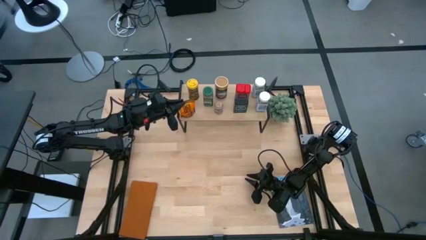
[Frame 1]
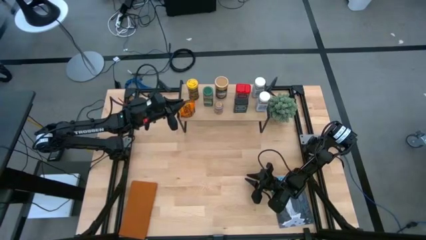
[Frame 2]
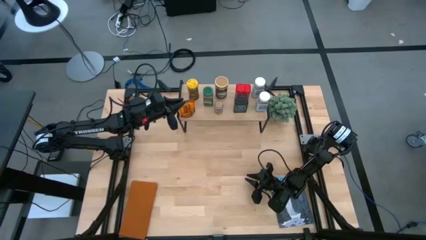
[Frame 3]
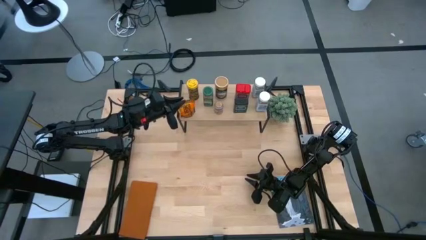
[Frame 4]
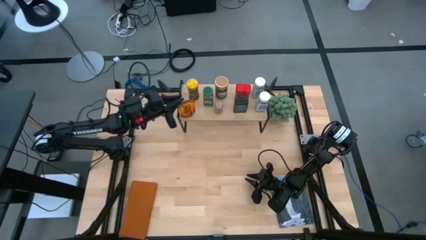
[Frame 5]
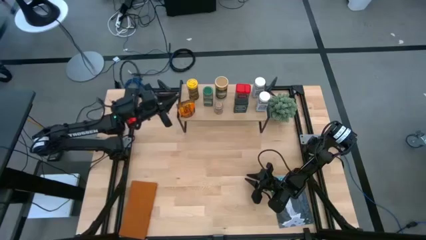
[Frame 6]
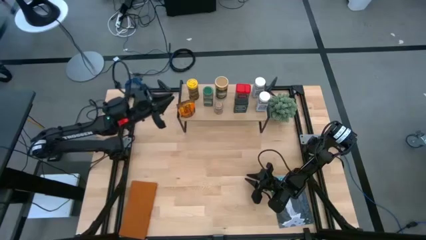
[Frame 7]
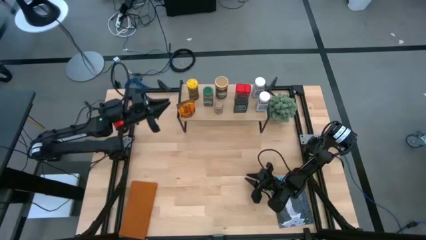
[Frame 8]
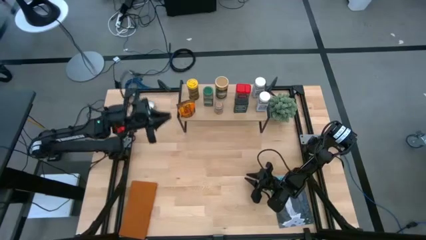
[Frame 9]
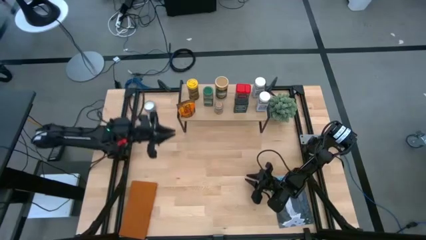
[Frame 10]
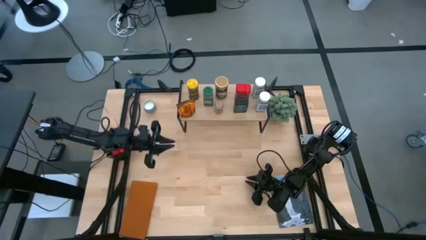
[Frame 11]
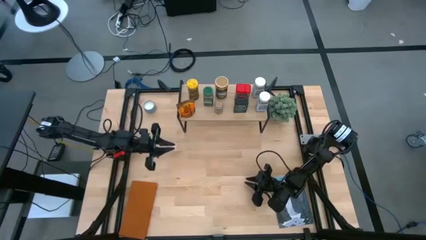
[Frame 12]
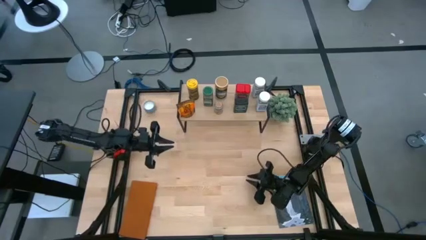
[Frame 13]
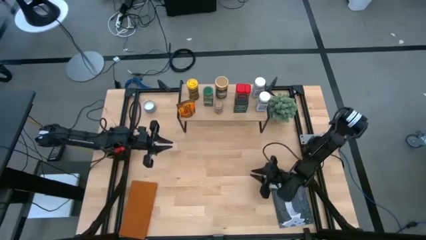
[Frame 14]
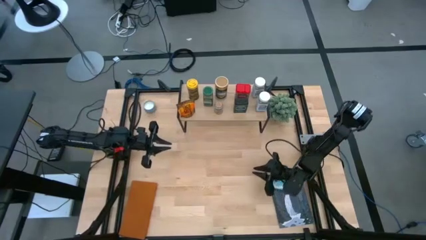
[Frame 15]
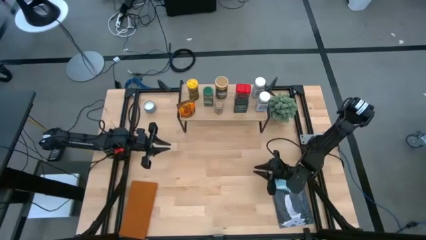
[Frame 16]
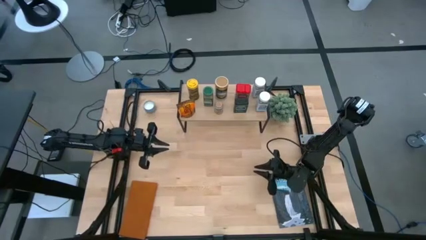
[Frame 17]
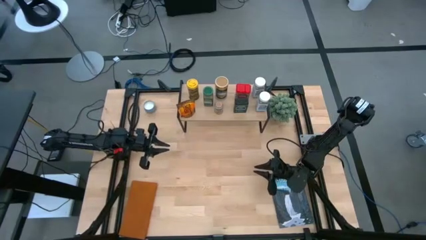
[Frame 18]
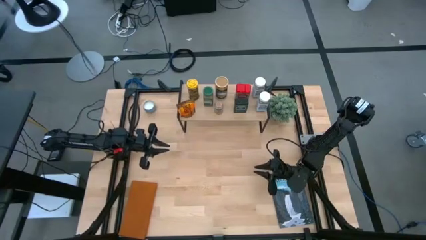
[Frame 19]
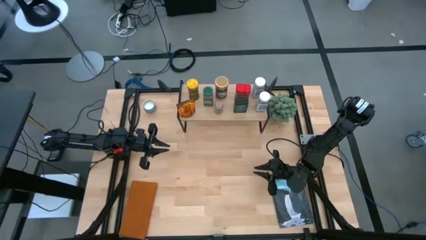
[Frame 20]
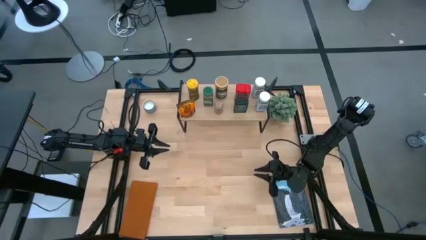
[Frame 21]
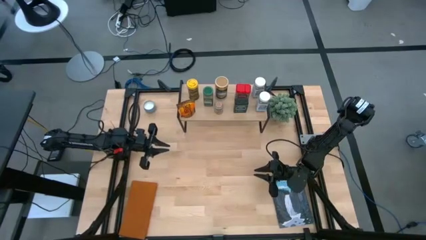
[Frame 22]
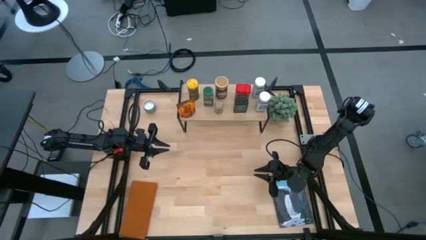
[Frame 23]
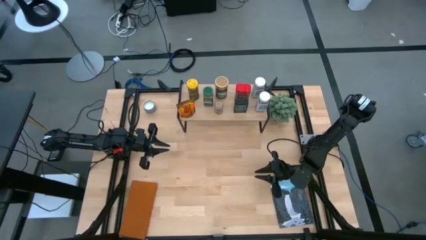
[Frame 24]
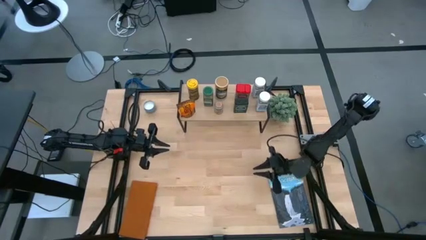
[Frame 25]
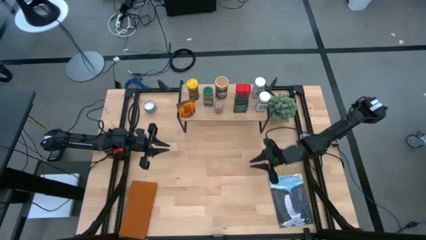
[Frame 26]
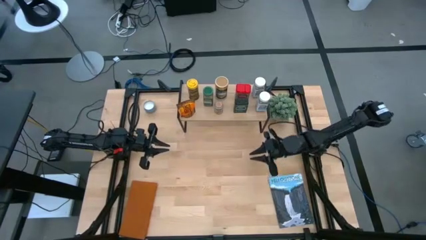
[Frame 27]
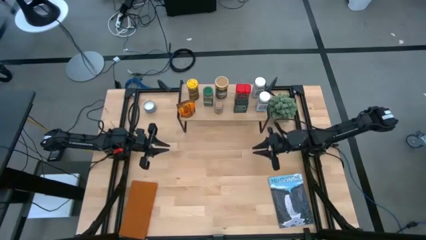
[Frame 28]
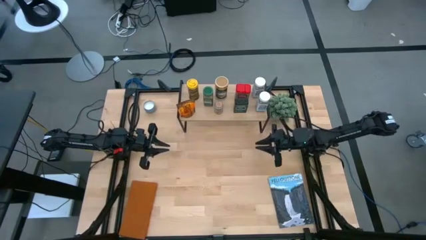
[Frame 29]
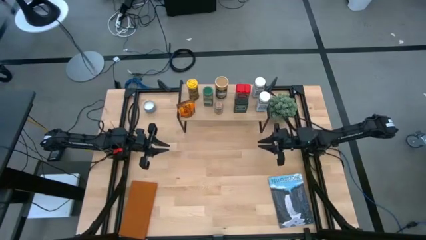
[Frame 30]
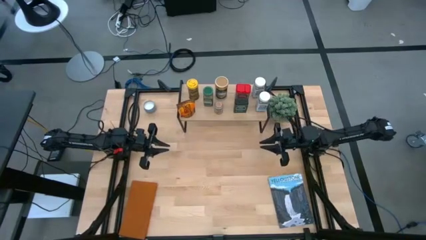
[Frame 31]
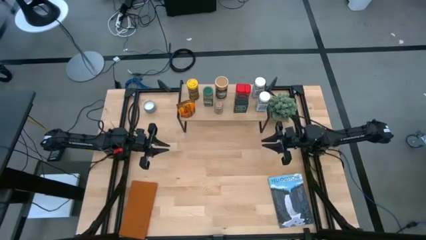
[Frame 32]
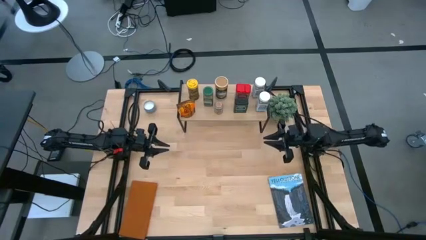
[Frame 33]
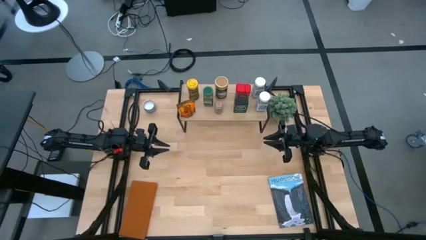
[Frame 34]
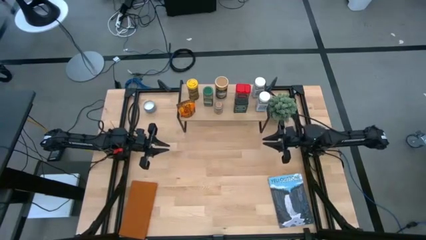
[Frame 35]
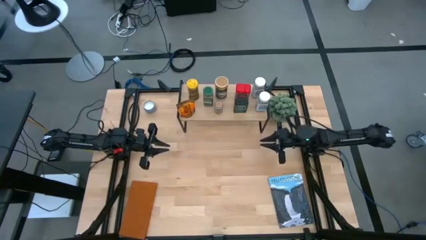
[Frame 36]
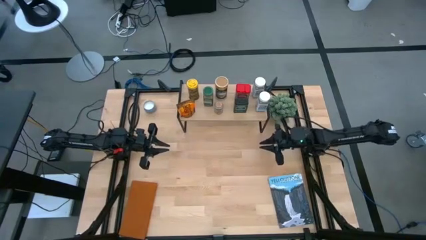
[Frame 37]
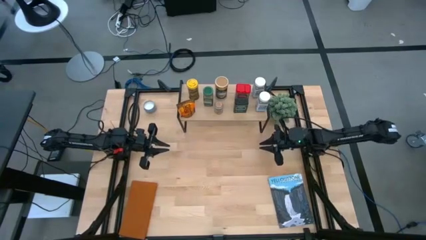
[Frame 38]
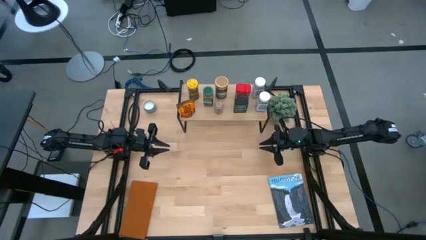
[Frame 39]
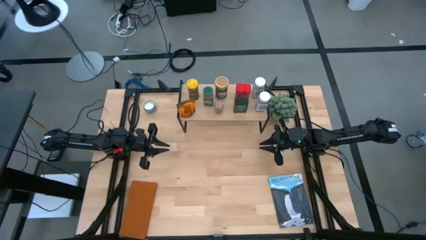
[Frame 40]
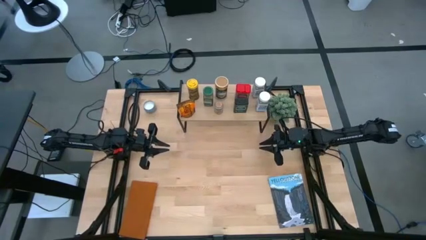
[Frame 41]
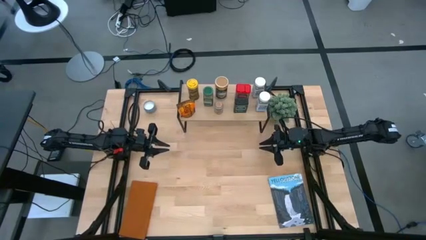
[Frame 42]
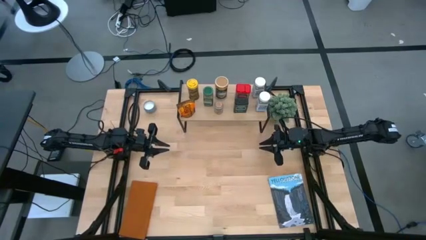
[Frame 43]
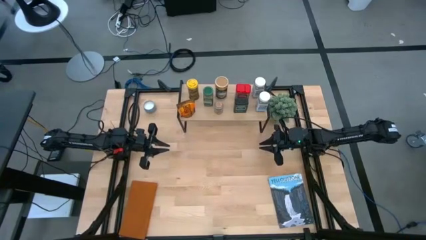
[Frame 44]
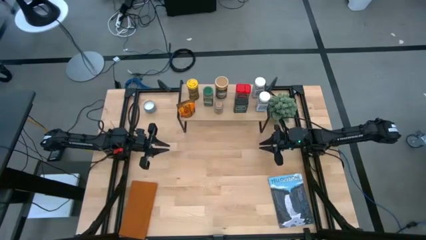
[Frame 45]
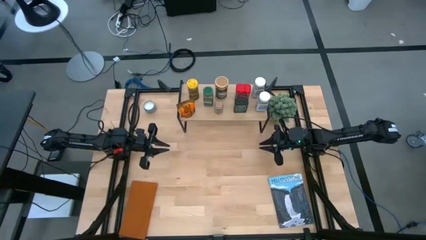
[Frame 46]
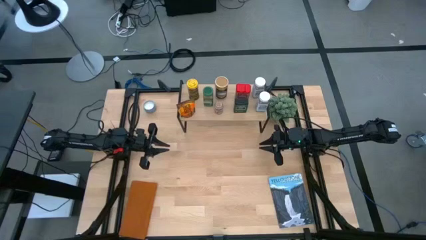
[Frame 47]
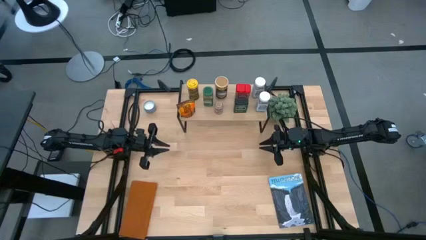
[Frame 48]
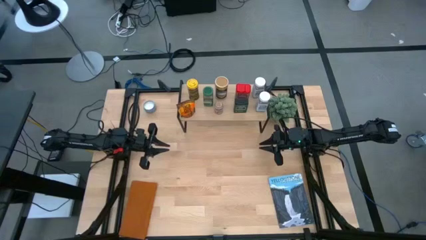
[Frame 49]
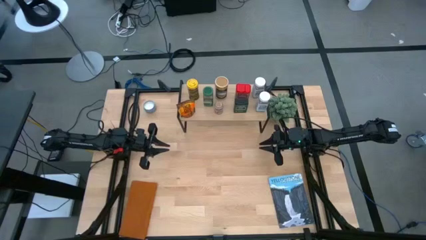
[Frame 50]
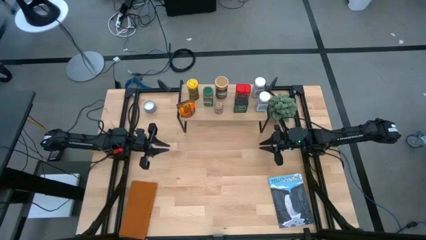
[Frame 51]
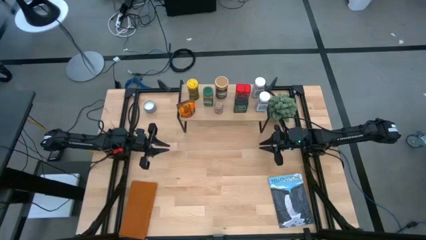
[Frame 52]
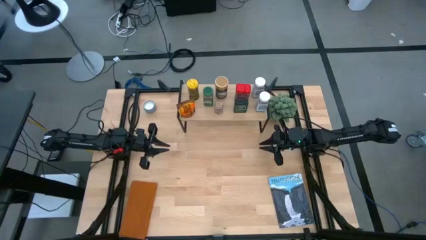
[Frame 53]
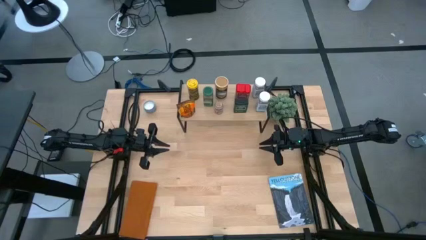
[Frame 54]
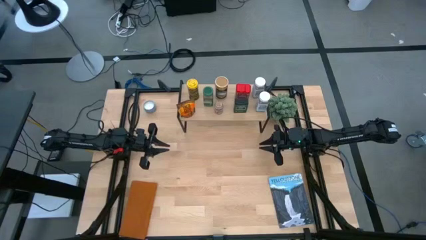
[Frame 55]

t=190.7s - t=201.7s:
Task: Shelf spices
Return to Home Position
